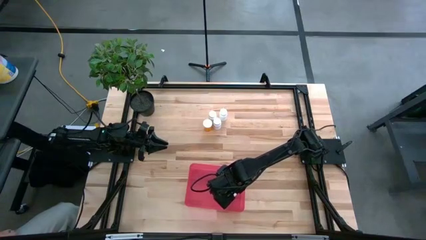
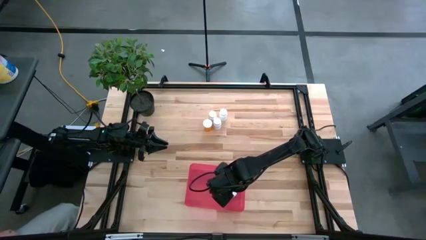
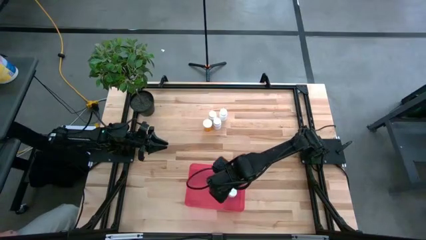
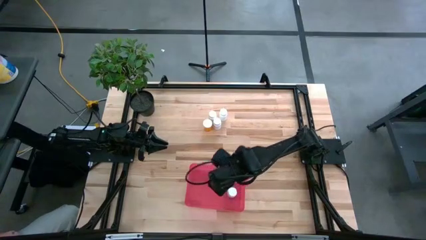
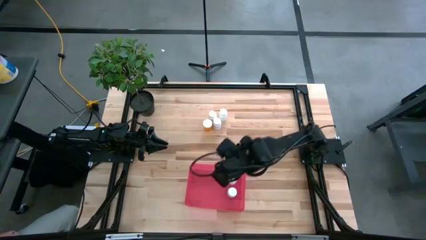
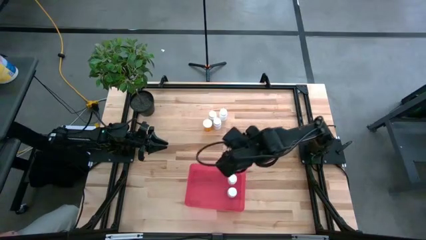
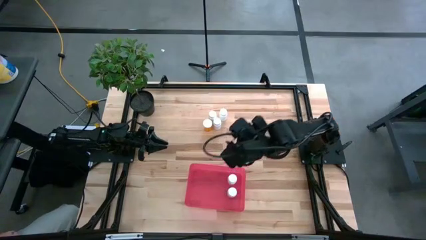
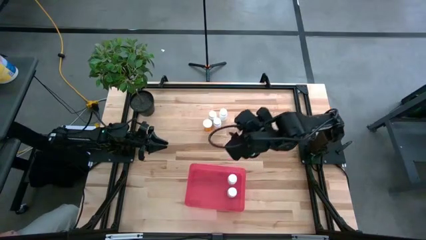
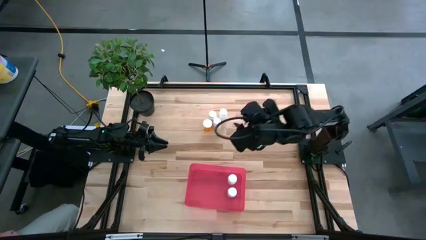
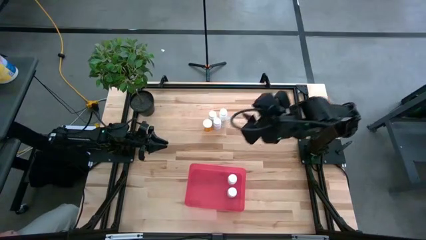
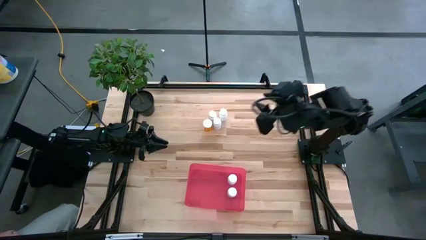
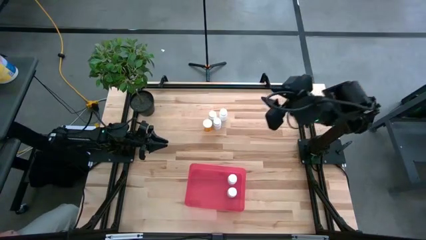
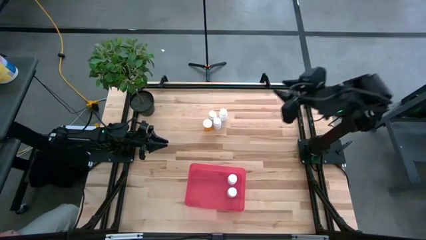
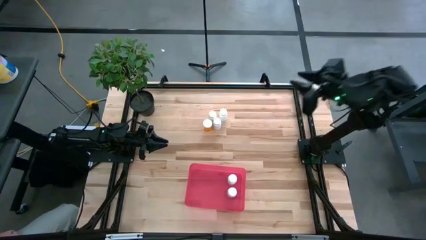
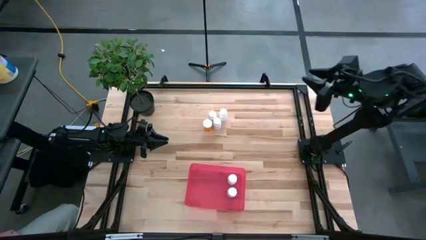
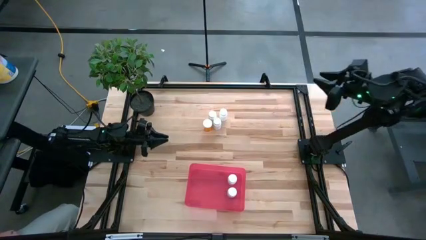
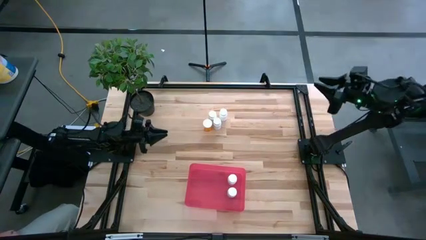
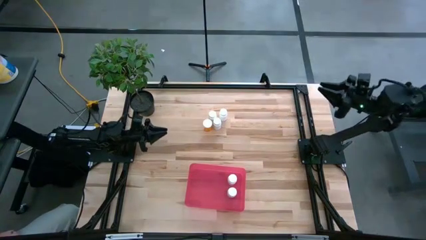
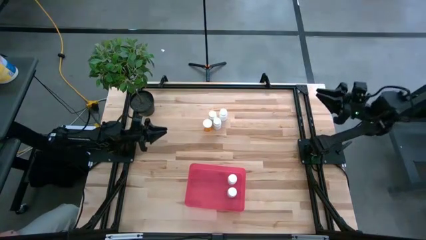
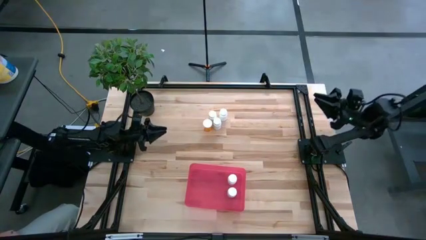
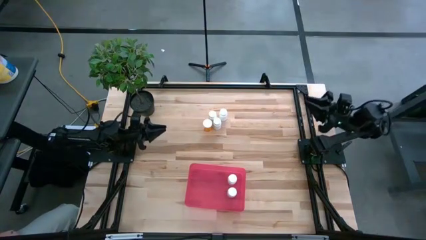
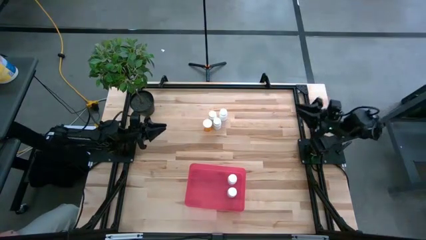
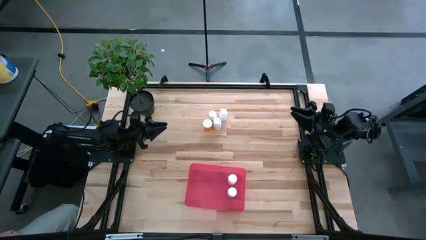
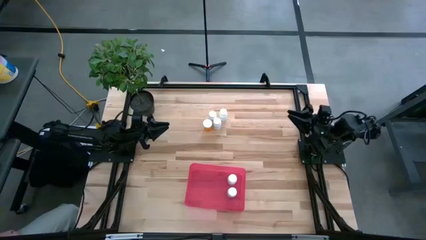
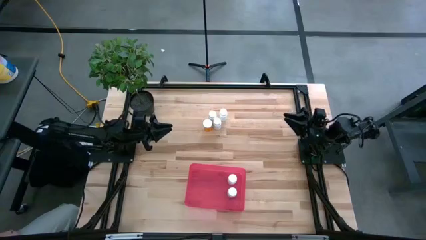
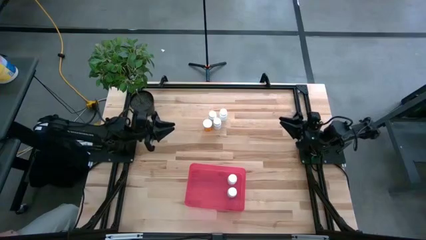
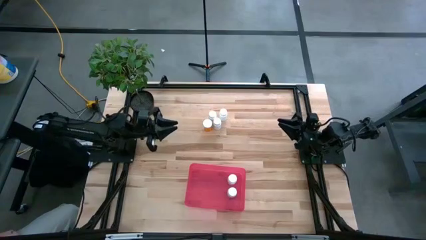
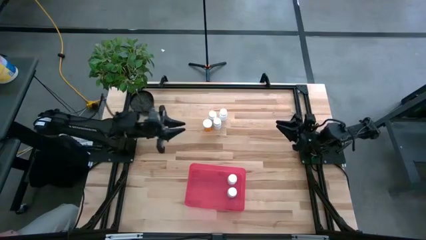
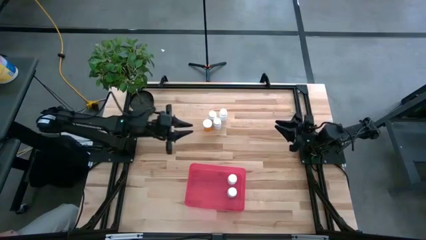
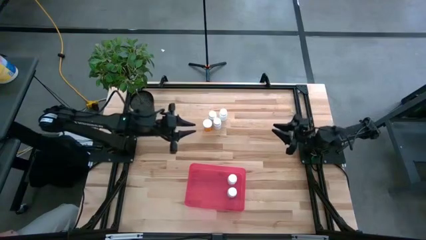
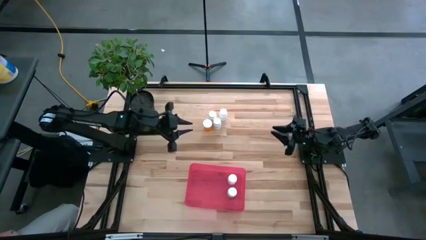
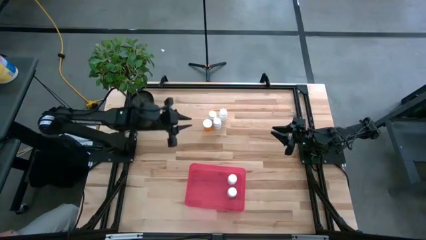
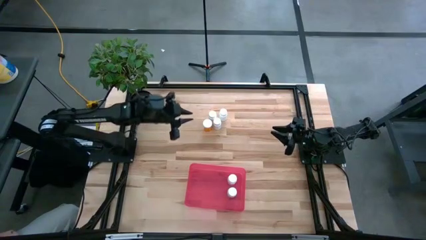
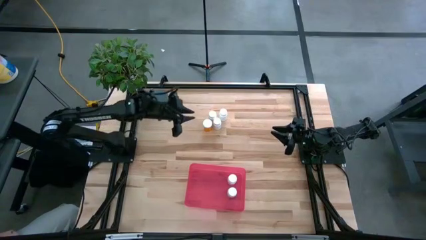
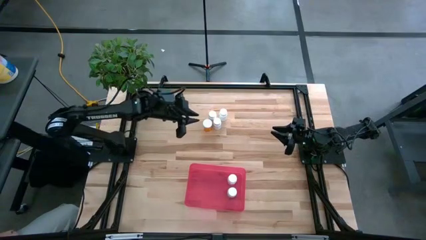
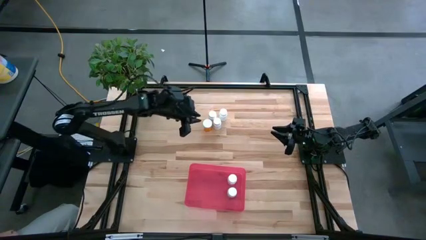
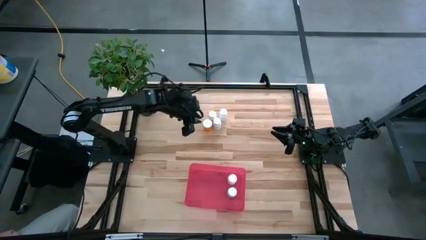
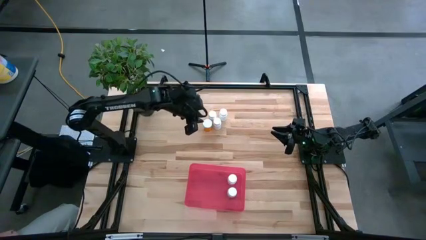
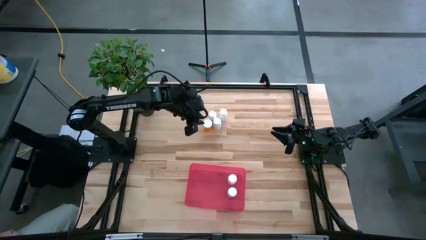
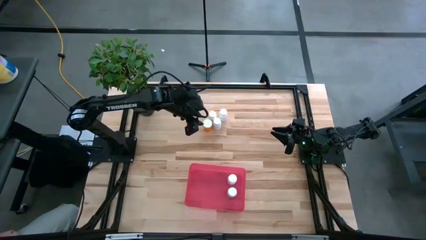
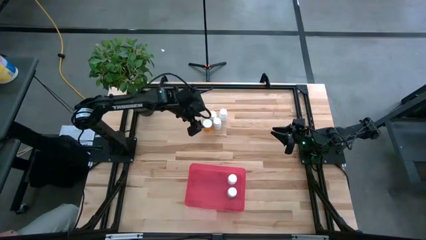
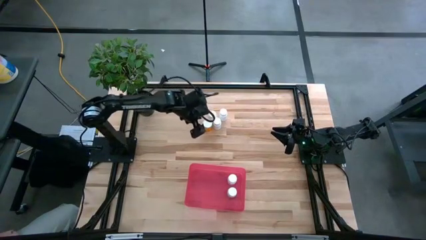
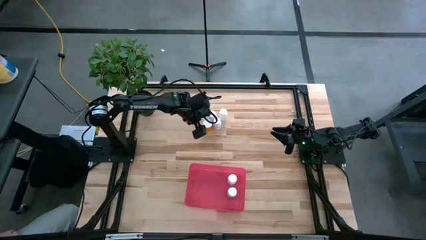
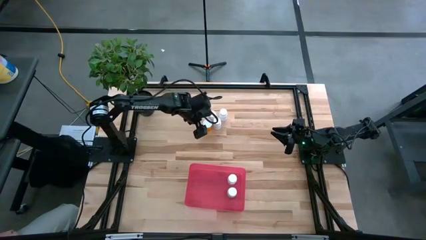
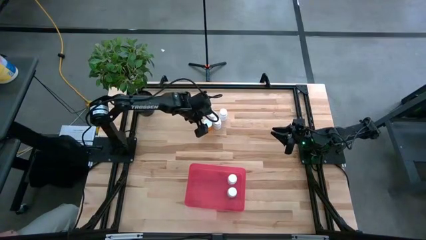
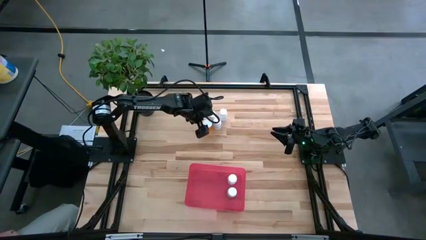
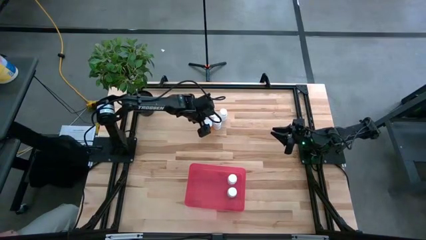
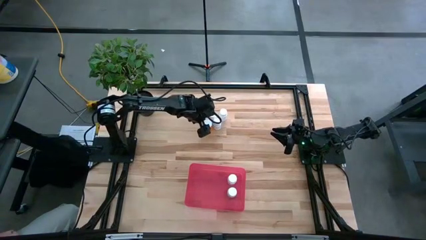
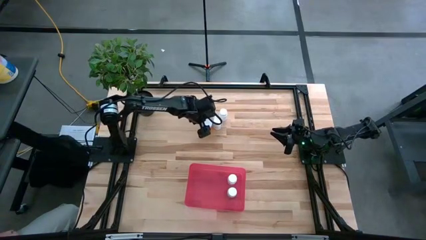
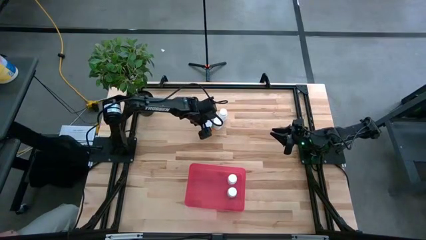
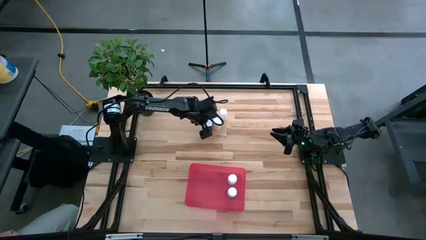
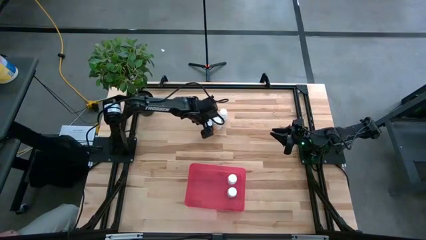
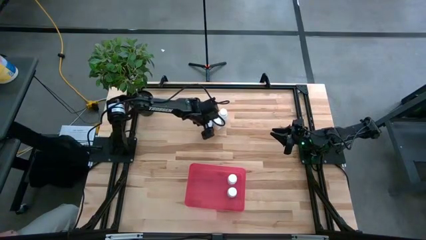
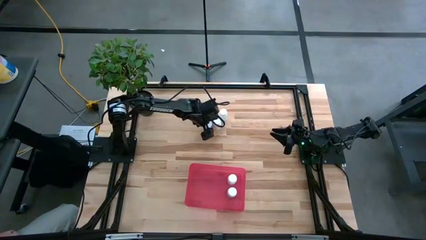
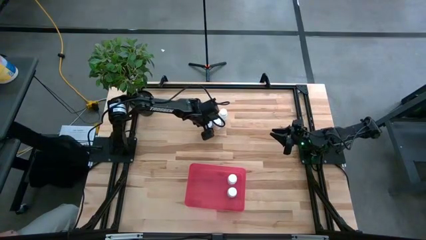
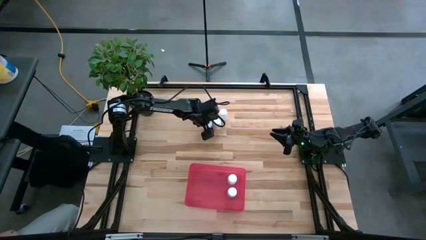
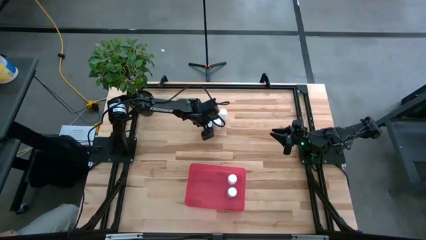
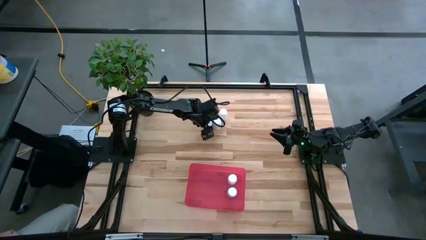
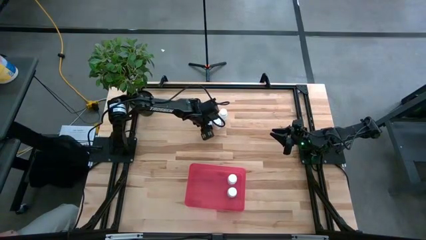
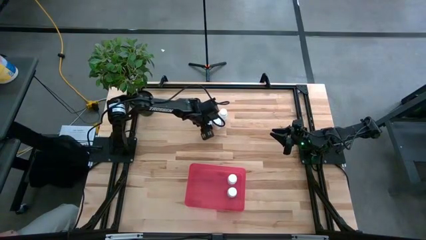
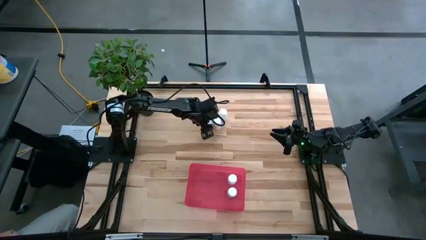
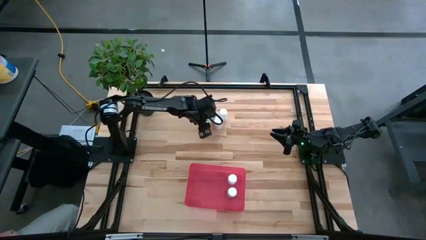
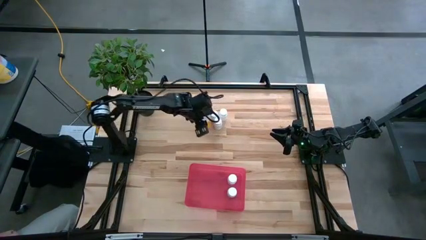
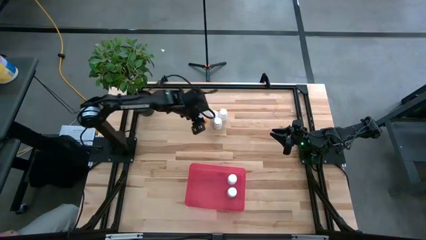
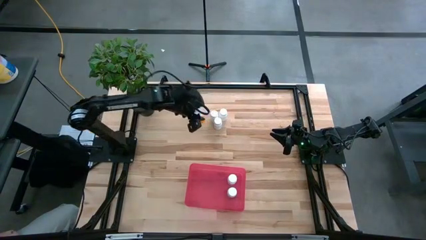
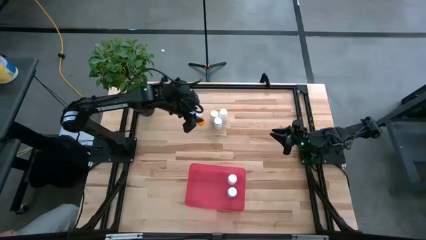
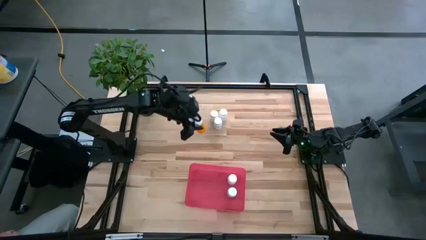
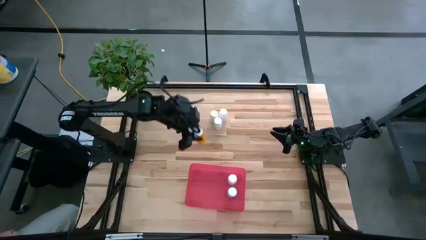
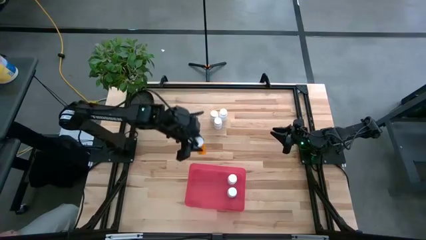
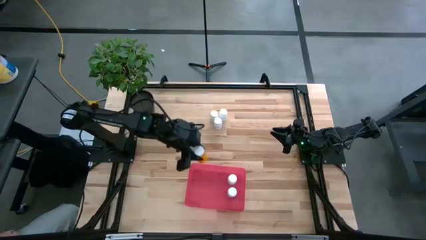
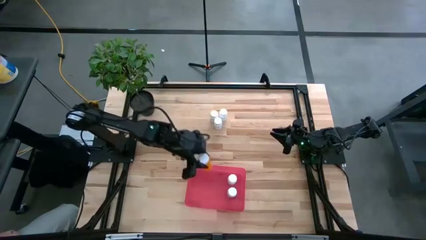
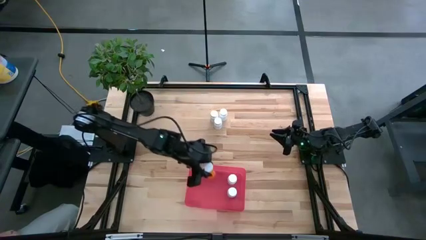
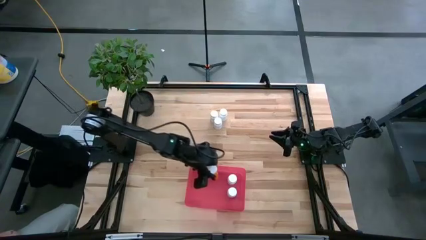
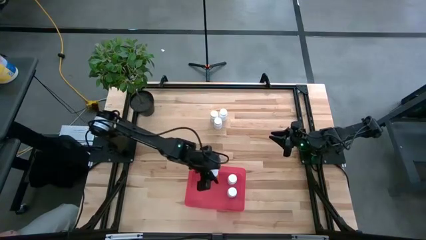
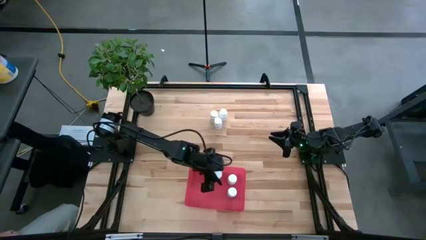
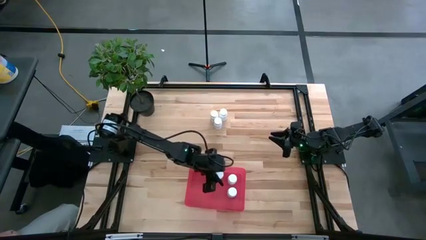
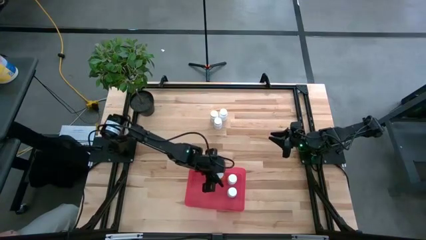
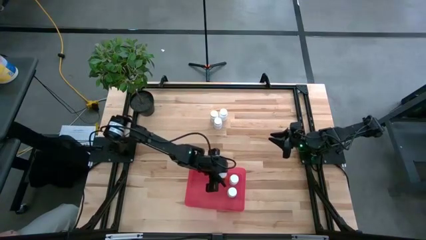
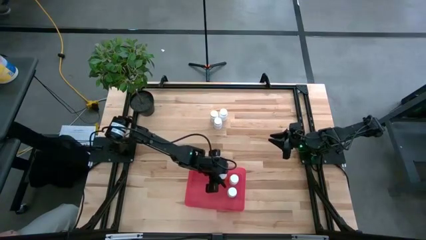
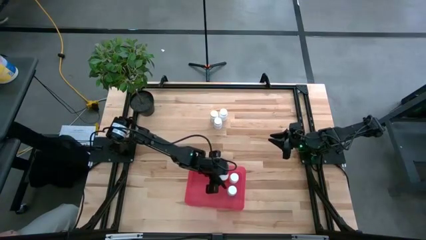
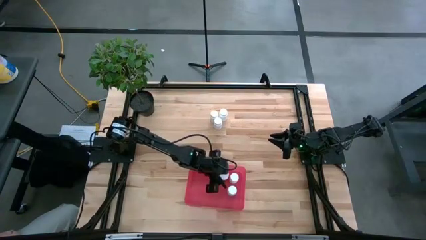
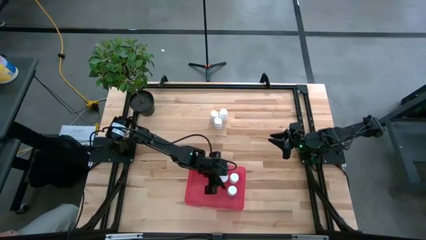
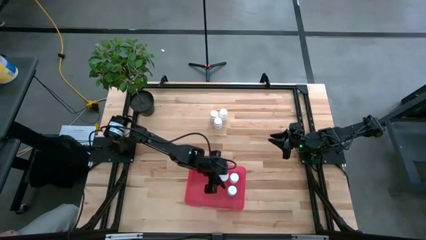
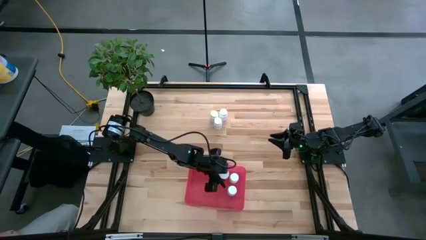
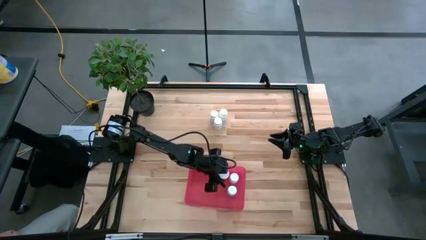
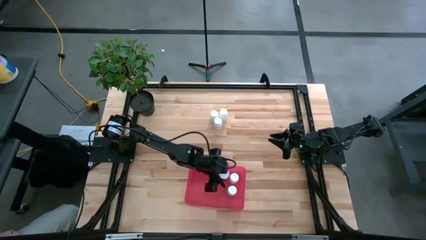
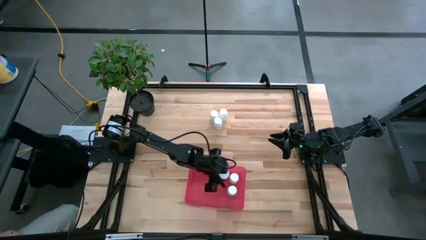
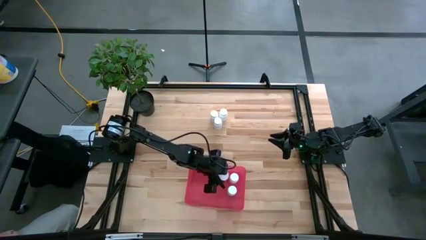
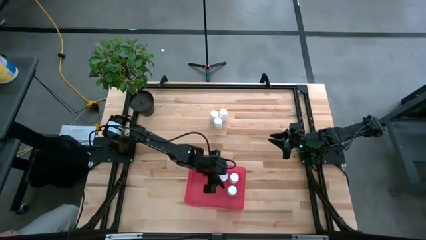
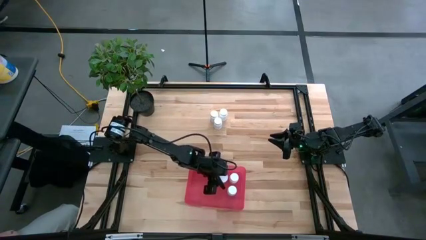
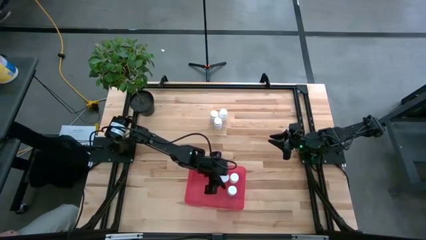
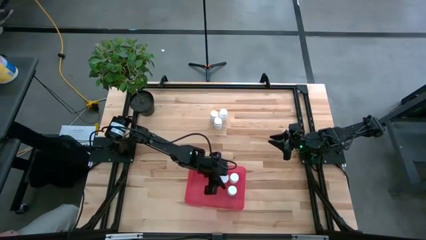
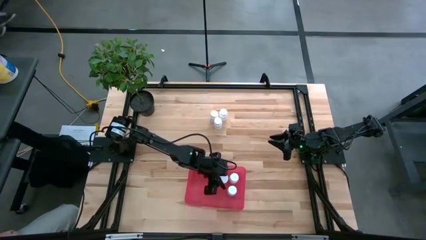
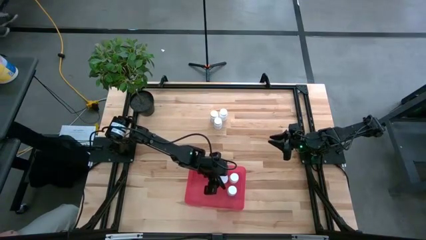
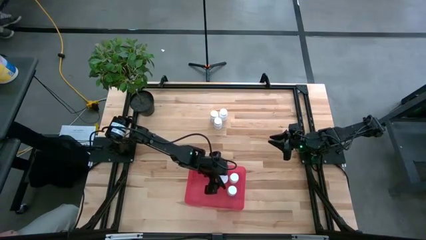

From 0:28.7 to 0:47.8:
Task: Pick and place pill bottles into a basket
Put the orange pill bottle into the red bin
